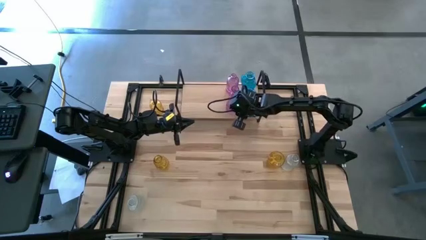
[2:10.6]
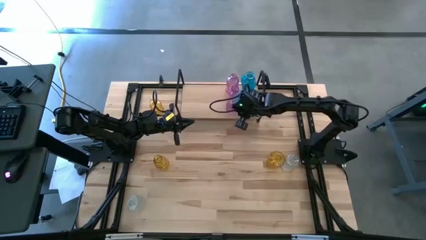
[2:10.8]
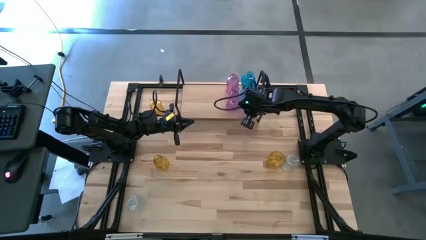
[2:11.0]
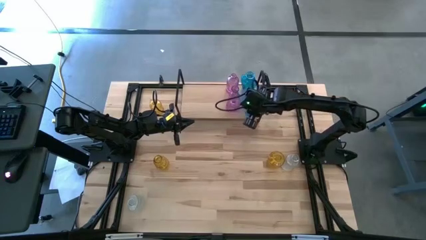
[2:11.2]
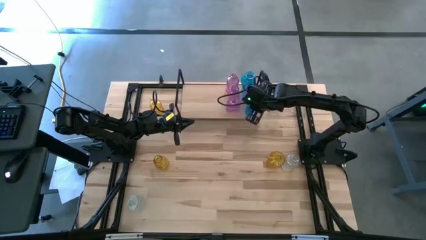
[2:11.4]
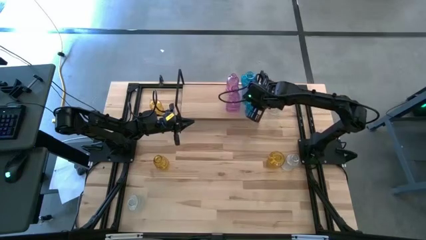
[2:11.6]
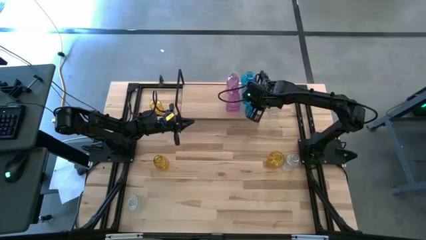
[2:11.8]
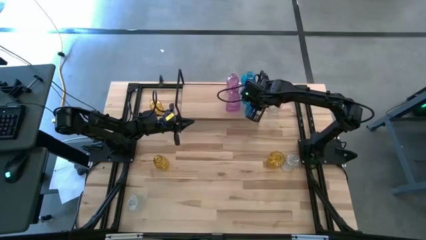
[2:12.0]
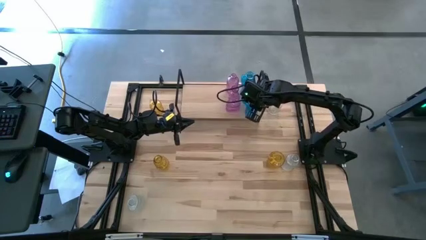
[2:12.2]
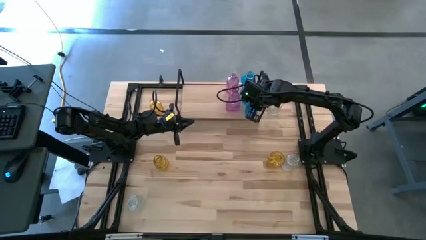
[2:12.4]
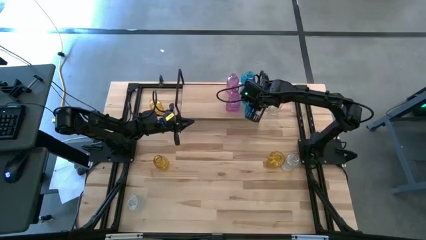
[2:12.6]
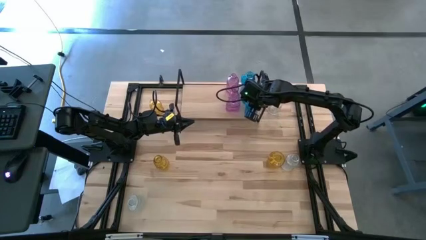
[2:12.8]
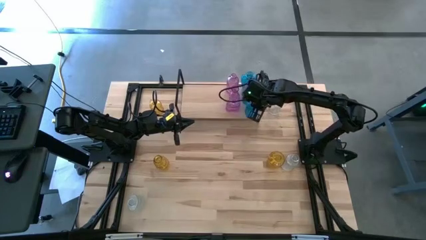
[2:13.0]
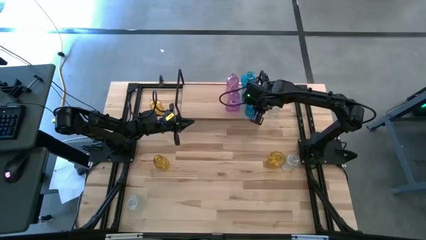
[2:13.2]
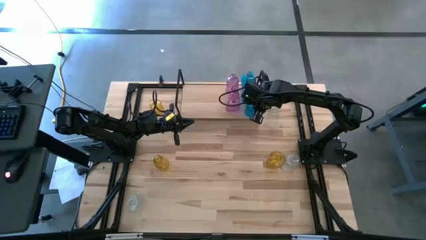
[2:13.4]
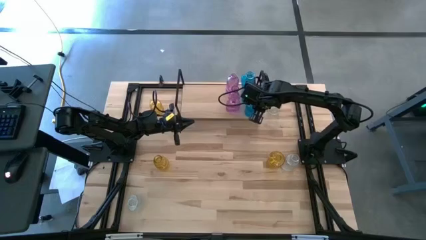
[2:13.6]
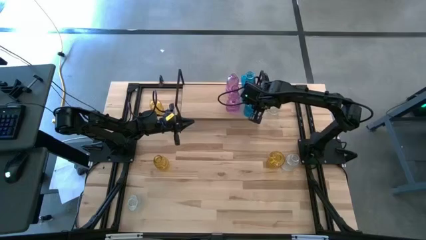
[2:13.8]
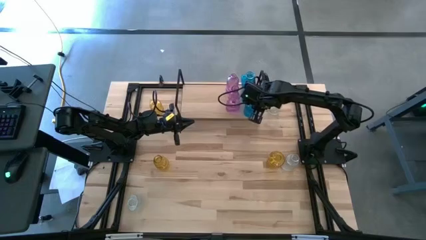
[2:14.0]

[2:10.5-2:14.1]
Task: sort vases onto shelf
Adjust the blue vase on the shelf

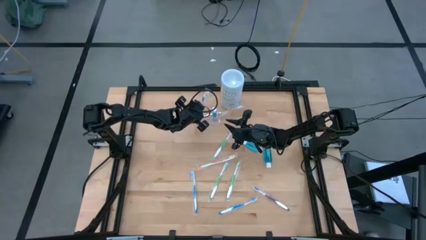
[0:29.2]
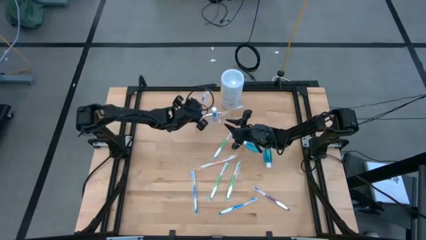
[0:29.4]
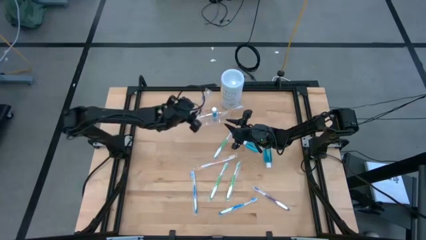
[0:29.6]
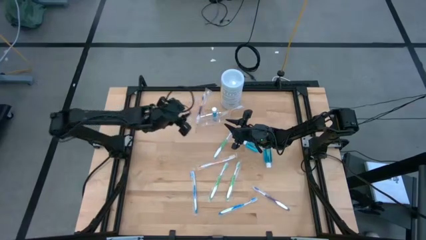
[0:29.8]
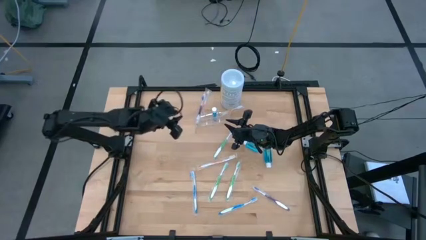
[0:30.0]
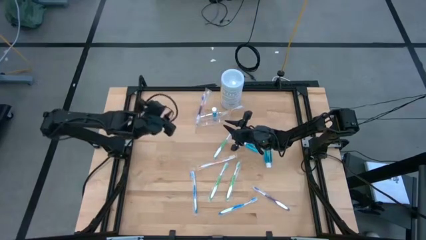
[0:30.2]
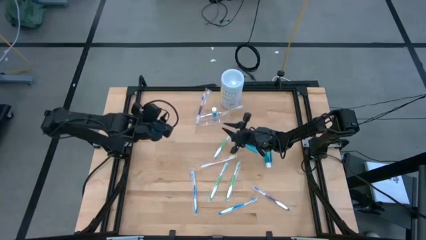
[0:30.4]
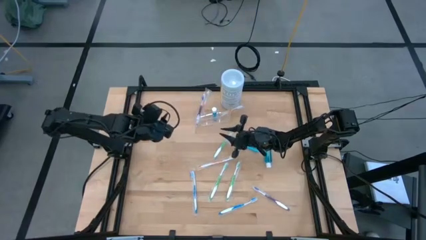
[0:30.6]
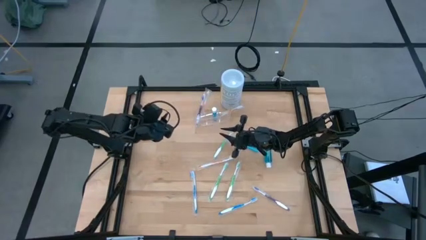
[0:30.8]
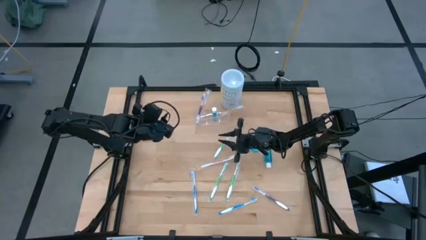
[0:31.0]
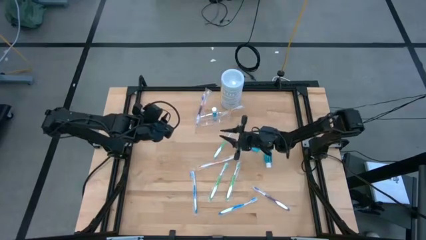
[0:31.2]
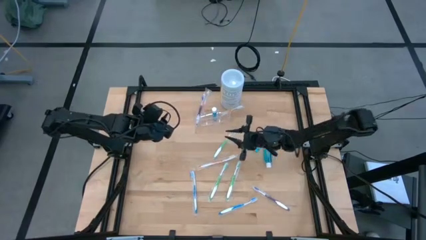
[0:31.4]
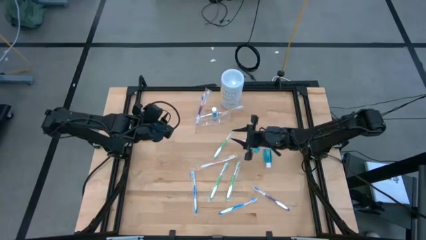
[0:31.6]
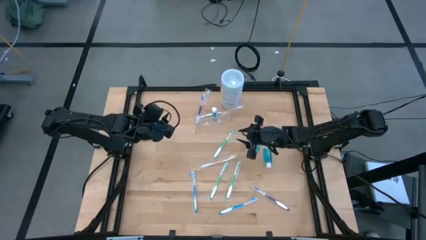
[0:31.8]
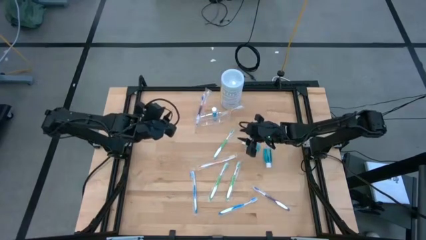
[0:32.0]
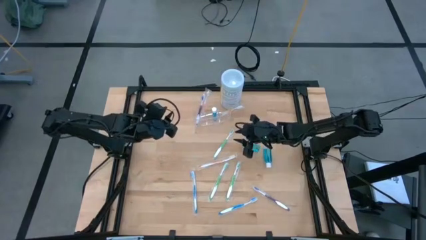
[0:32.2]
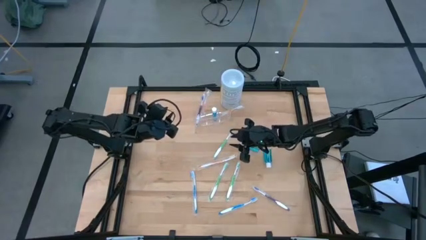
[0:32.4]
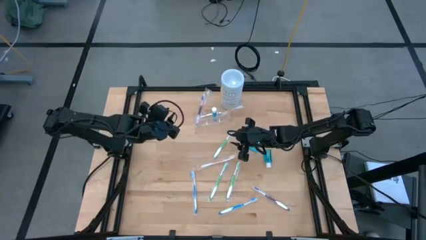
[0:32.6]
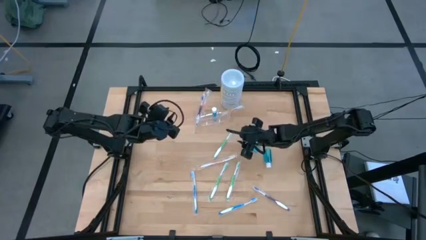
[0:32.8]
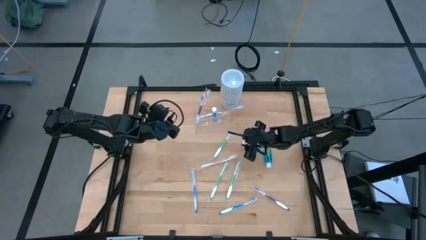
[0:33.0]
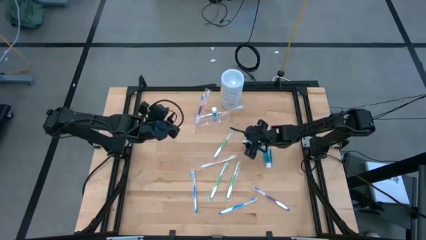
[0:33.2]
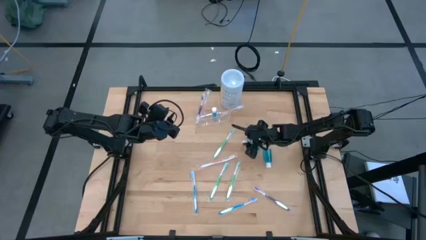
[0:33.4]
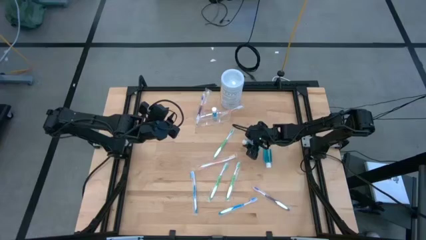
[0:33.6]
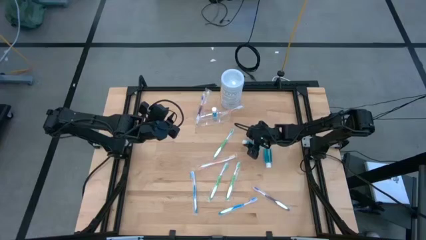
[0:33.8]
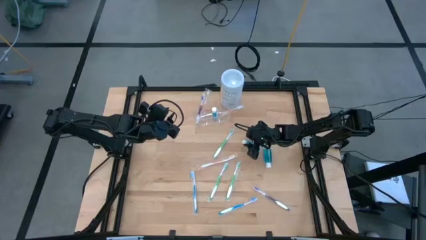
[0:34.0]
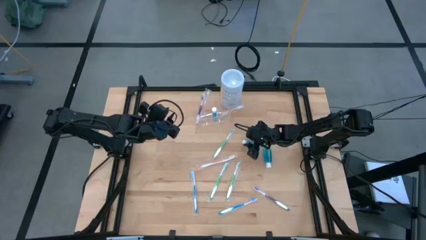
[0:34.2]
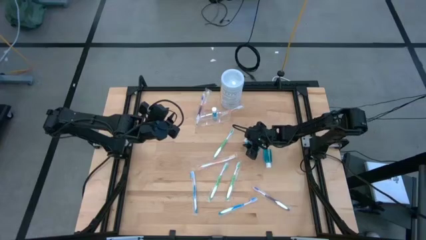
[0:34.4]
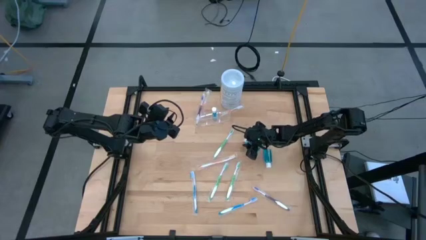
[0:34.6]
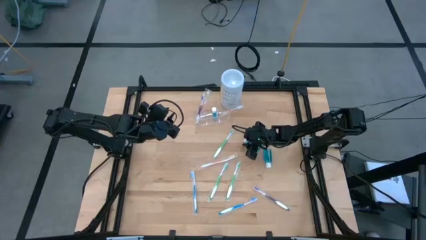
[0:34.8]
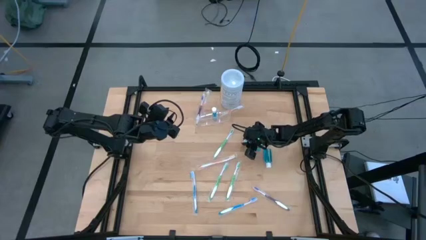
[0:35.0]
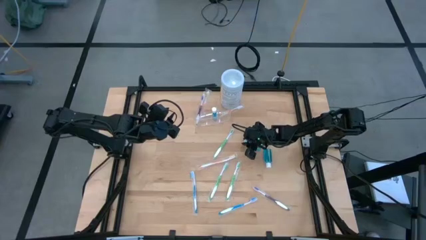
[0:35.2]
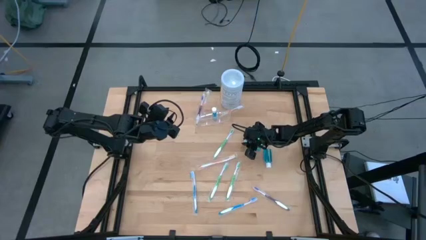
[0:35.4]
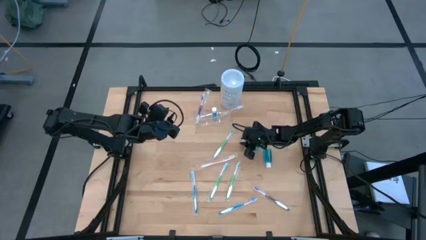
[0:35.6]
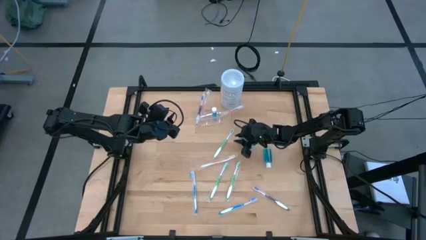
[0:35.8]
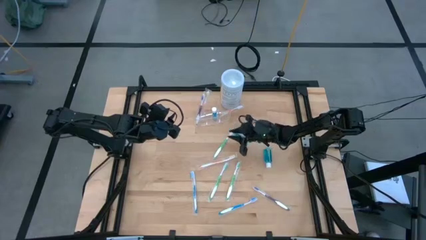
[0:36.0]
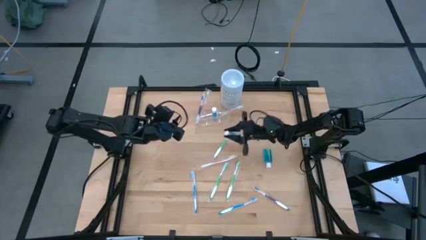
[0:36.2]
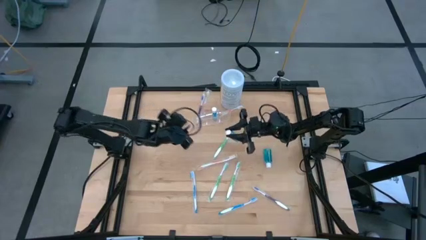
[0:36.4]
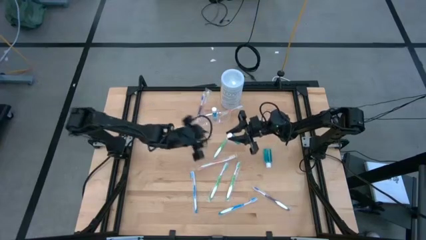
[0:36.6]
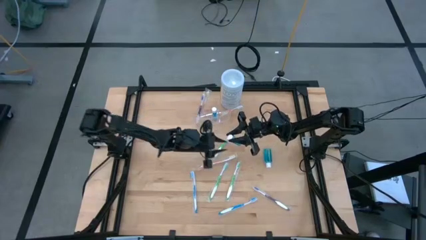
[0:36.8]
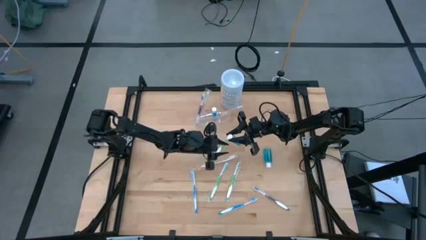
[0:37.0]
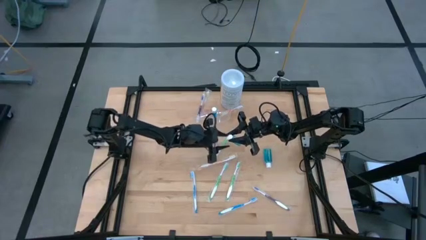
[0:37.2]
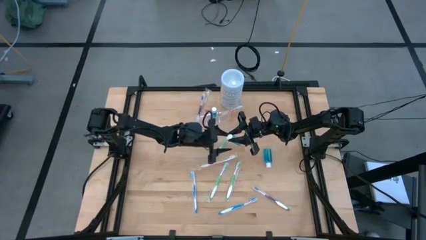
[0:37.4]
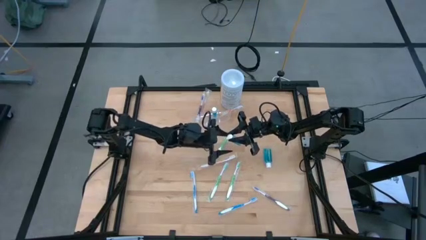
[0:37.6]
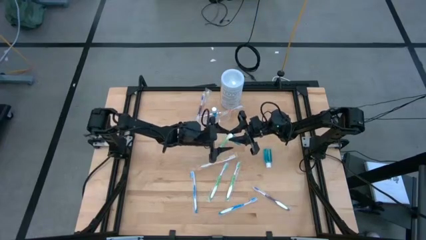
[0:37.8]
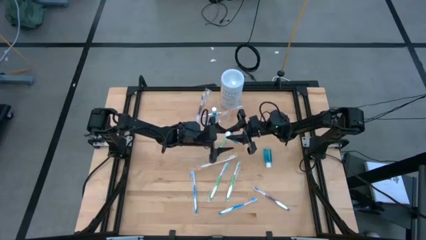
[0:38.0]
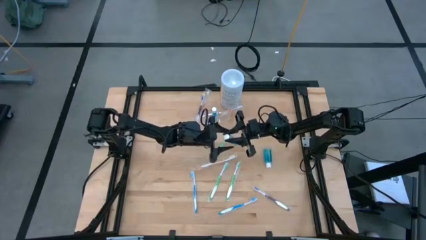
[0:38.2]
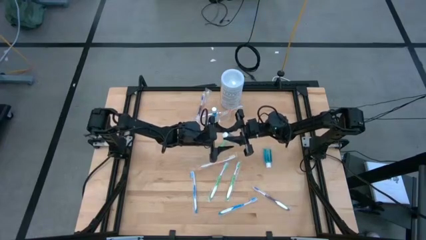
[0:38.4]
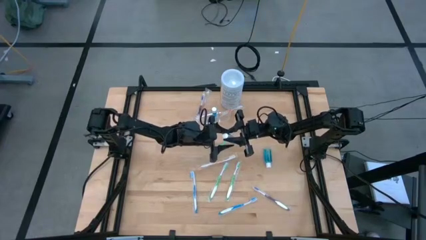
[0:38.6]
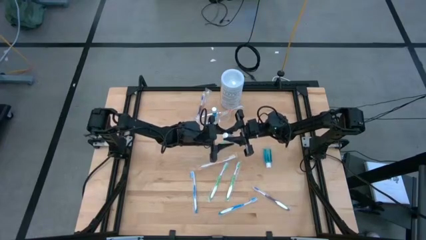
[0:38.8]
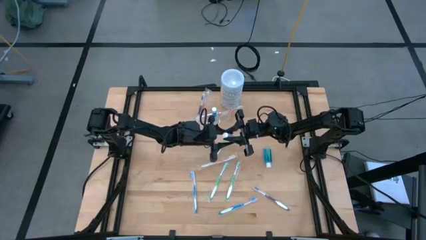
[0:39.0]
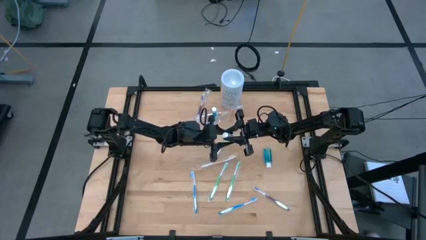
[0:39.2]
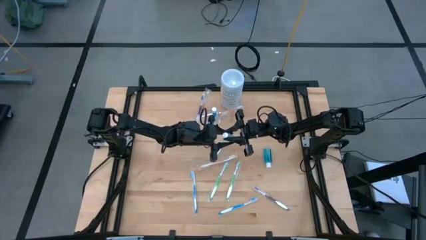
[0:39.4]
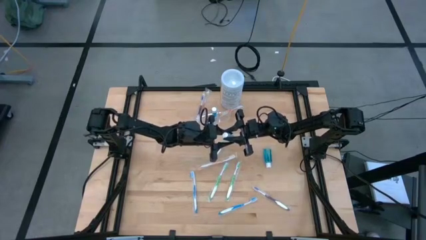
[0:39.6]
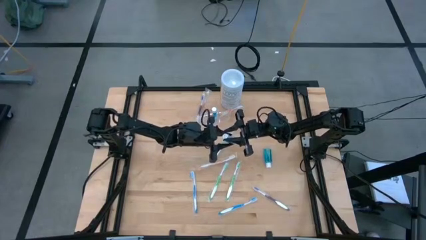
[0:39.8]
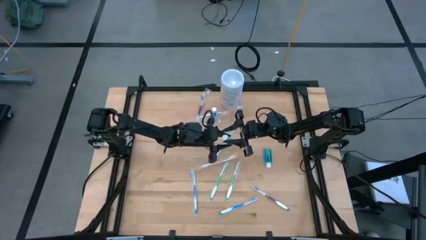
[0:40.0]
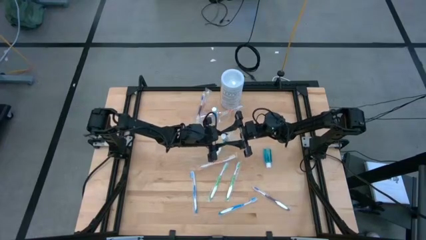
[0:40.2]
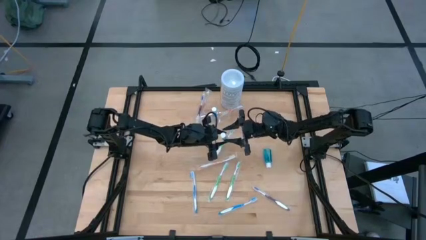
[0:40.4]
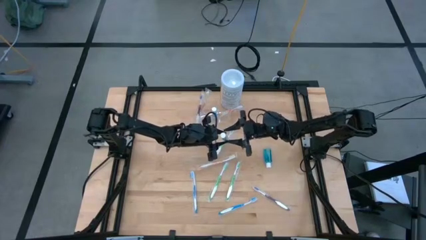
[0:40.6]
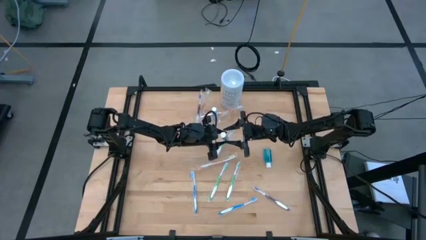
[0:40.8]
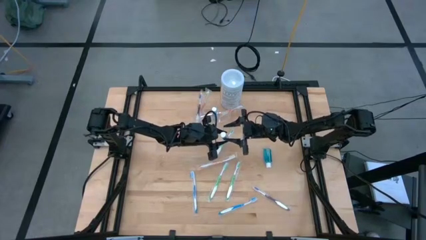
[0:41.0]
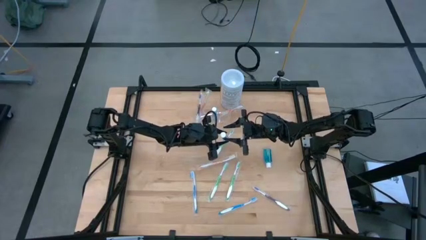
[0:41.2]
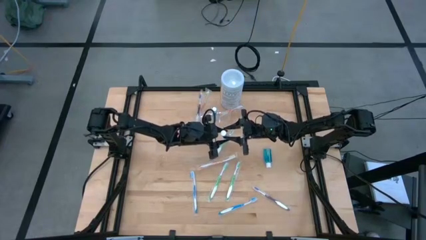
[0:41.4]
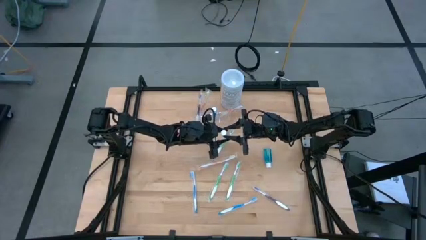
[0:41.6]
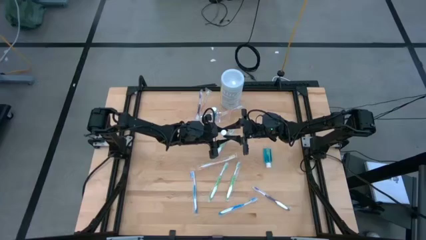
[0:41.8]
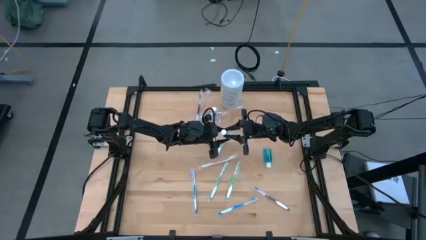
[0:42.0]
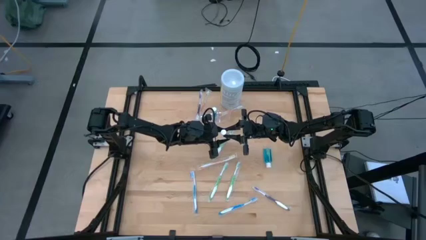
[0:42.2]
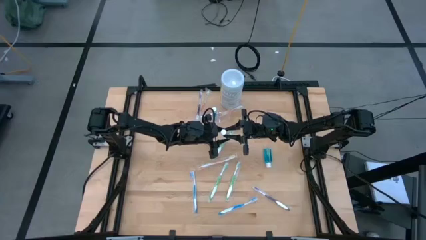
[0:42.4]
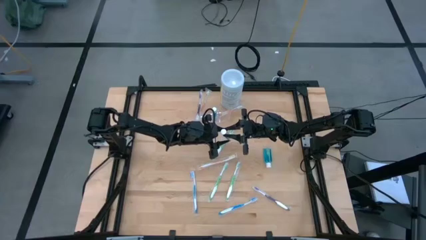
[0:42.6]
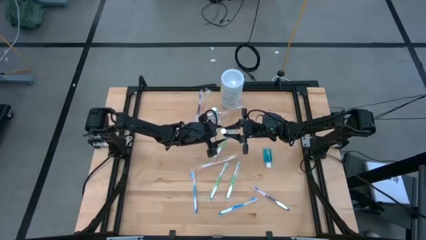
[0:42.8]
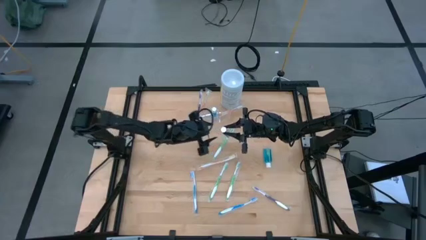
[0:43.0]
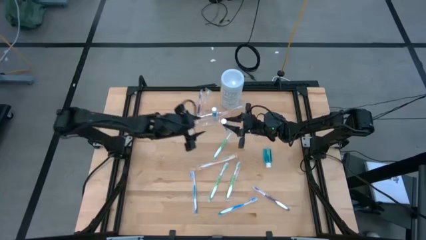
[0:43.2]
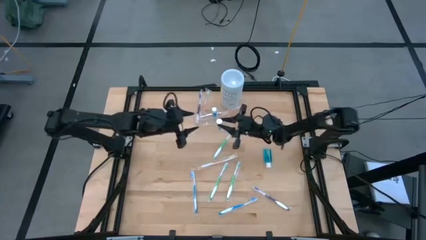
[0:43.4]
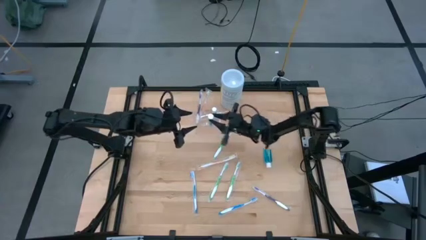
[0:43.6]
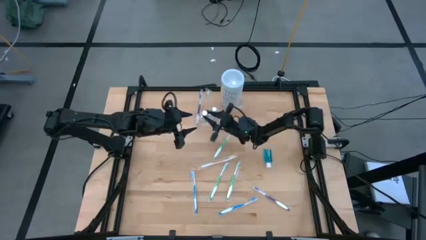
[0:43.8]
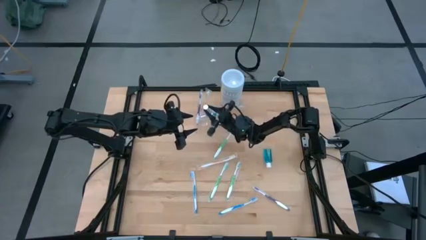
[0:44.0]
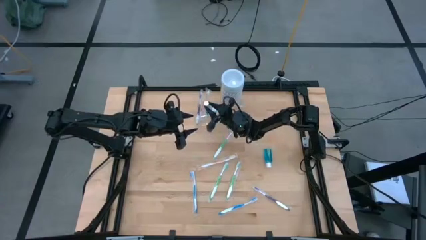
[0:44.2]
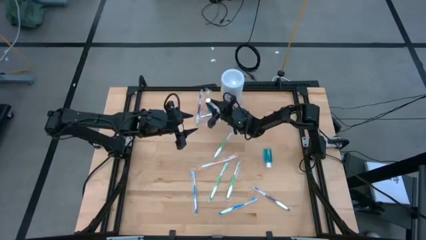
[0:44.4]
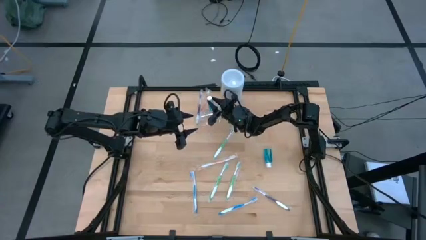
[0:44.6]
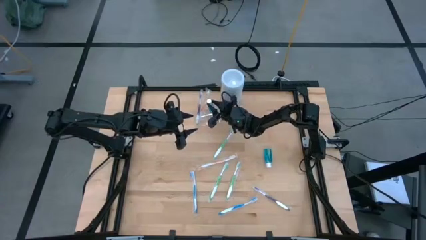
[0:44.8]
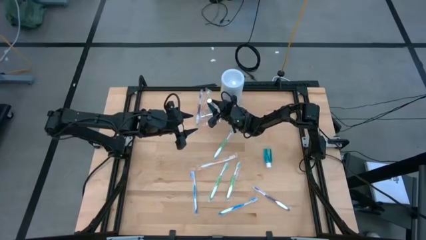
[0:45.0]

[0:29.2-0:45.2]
Task: Pick & Place toothbrushing station
Put the top blue mouthwash into the transparent organizer
